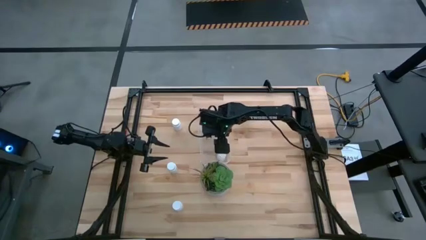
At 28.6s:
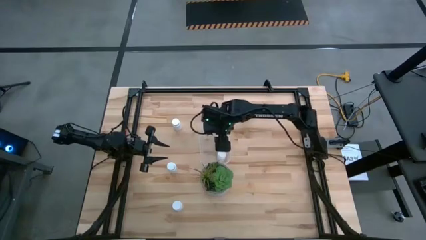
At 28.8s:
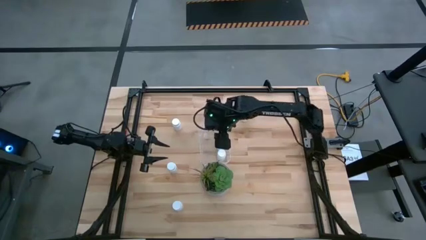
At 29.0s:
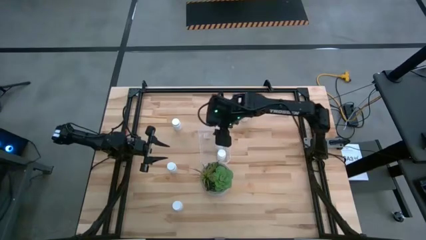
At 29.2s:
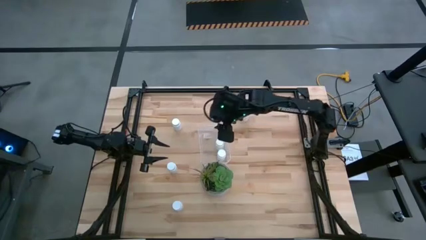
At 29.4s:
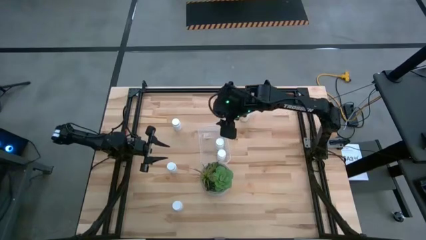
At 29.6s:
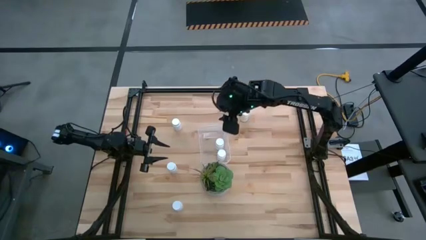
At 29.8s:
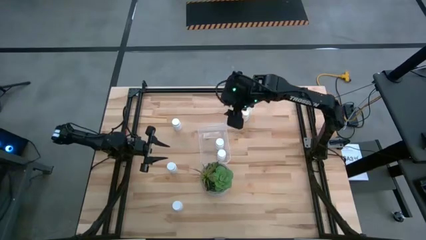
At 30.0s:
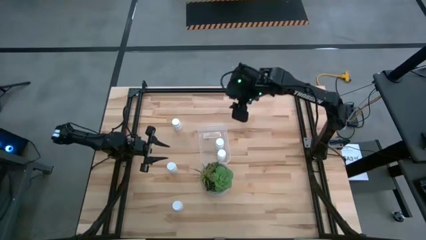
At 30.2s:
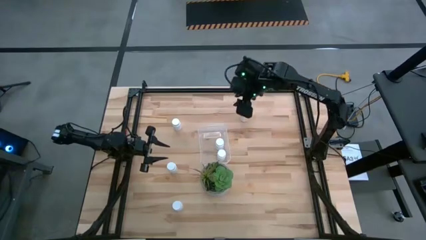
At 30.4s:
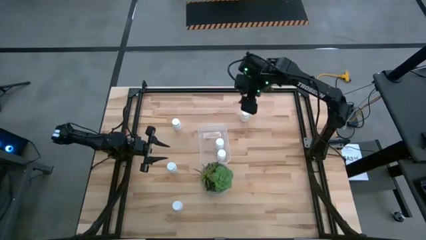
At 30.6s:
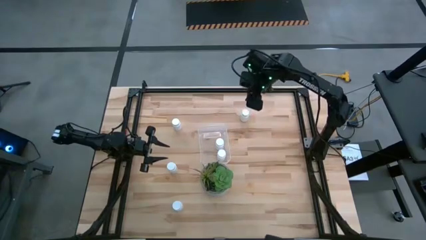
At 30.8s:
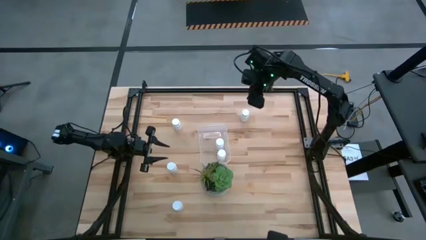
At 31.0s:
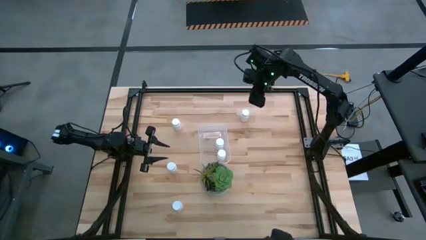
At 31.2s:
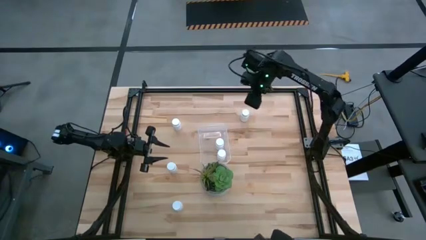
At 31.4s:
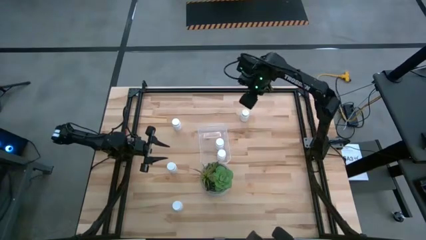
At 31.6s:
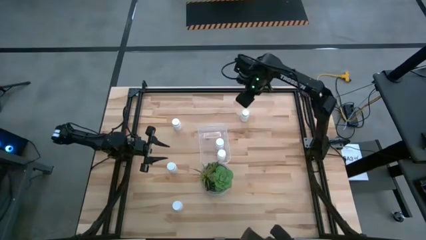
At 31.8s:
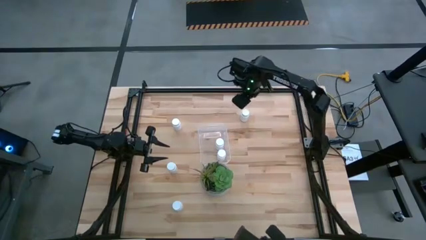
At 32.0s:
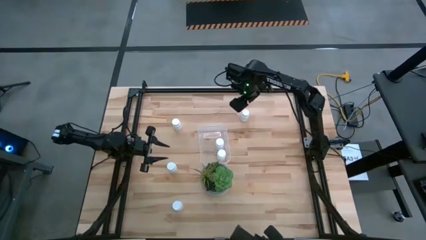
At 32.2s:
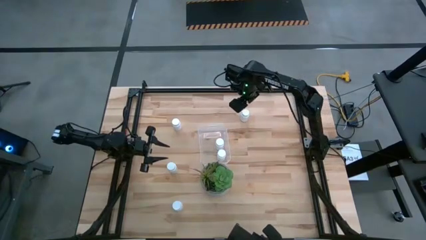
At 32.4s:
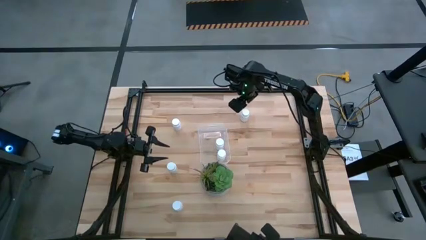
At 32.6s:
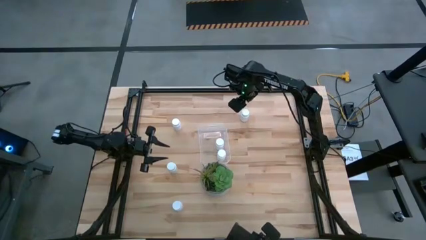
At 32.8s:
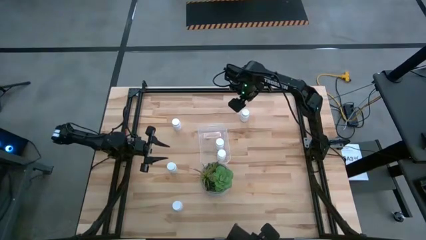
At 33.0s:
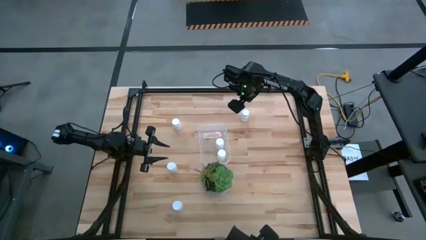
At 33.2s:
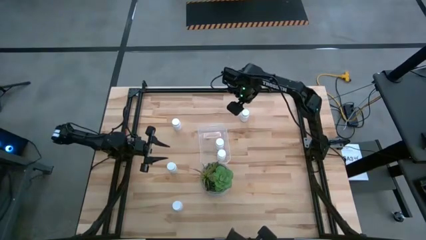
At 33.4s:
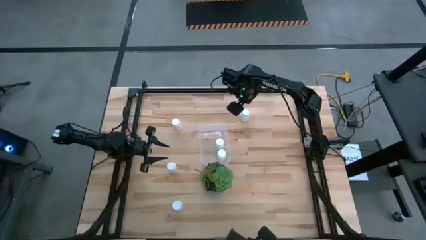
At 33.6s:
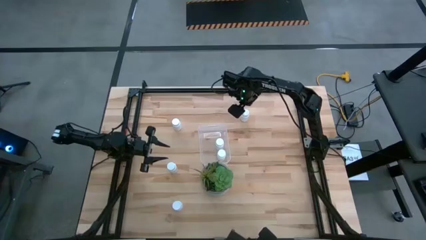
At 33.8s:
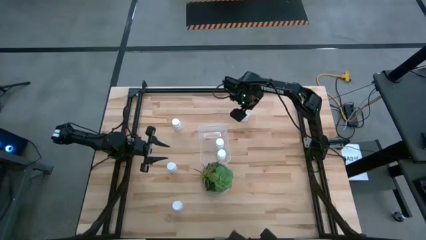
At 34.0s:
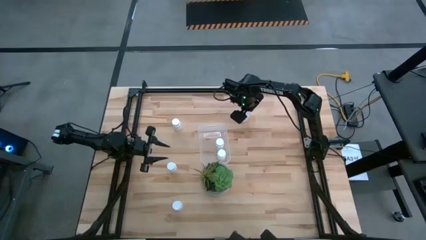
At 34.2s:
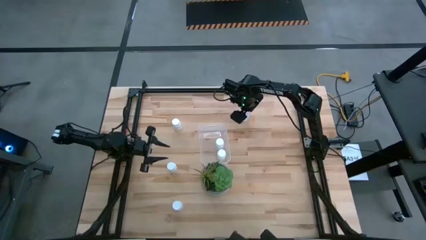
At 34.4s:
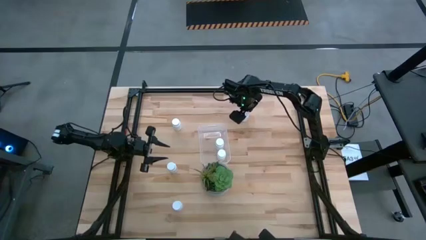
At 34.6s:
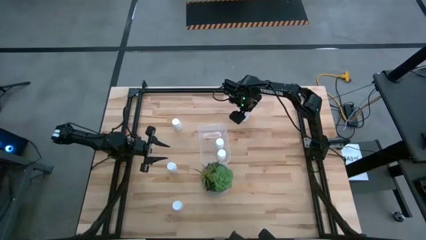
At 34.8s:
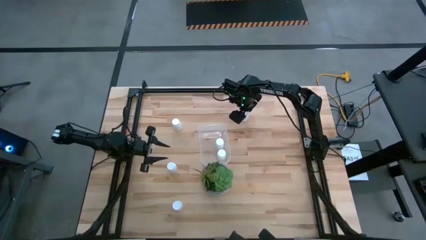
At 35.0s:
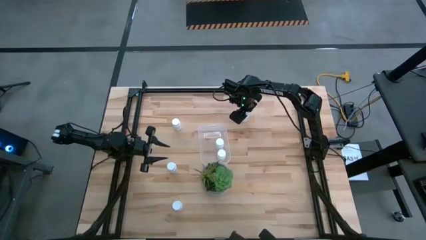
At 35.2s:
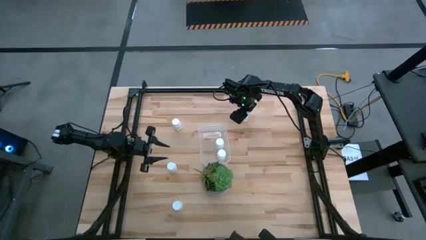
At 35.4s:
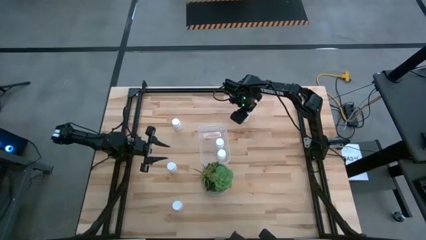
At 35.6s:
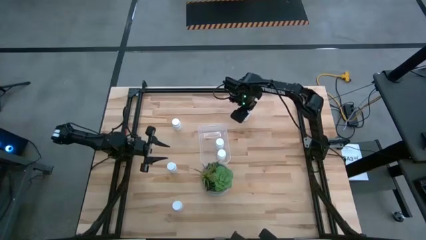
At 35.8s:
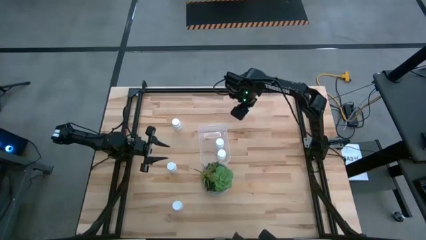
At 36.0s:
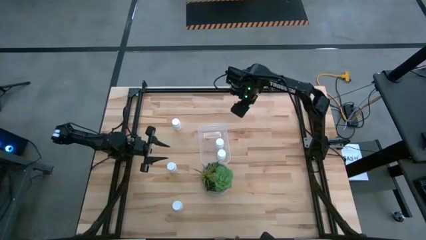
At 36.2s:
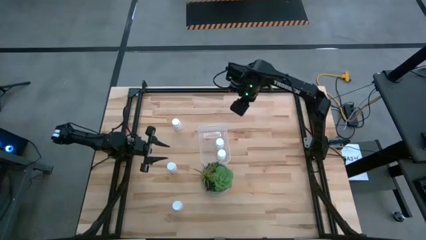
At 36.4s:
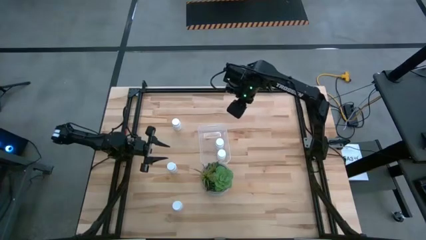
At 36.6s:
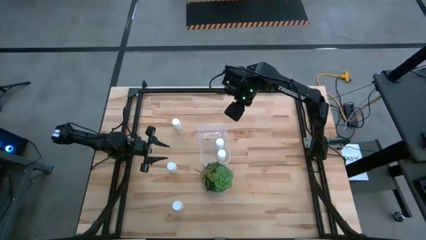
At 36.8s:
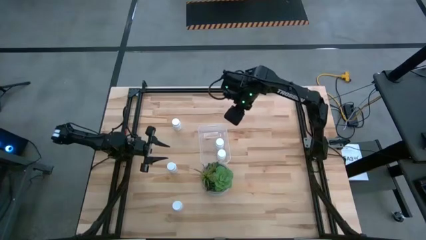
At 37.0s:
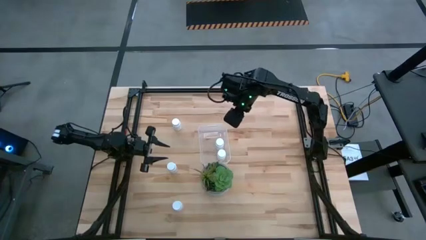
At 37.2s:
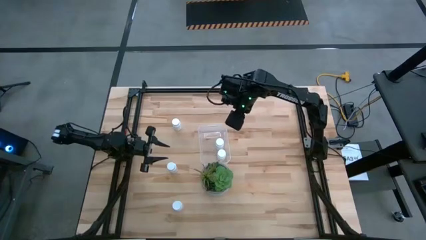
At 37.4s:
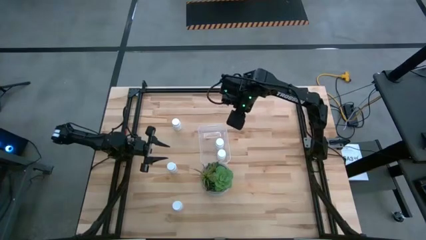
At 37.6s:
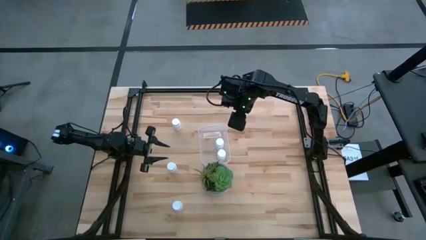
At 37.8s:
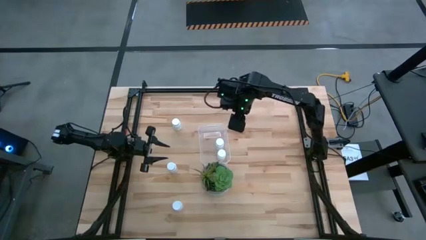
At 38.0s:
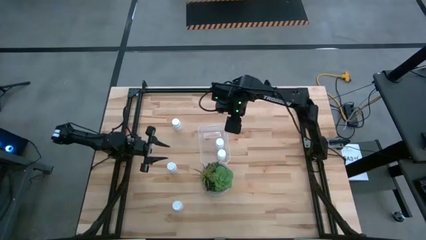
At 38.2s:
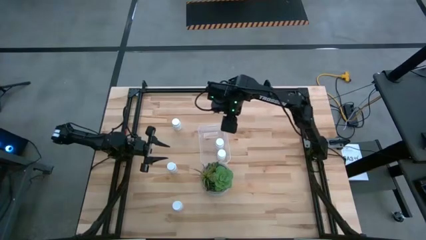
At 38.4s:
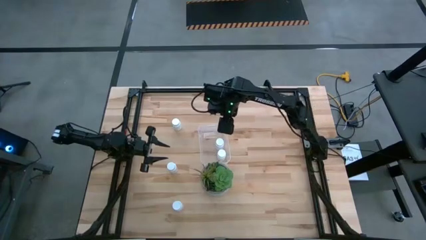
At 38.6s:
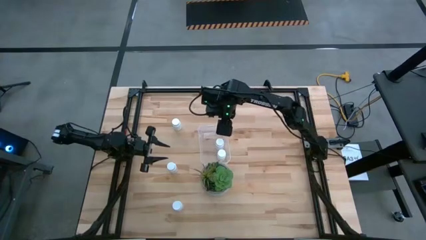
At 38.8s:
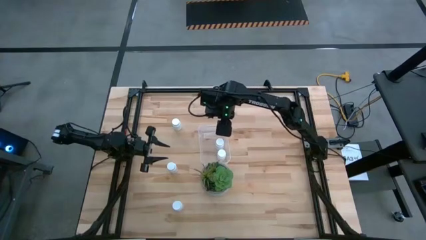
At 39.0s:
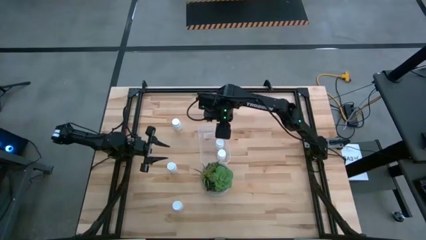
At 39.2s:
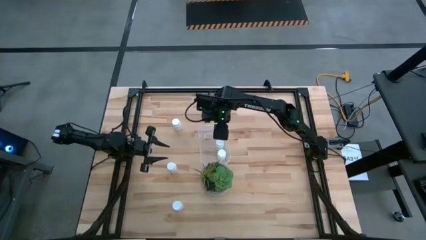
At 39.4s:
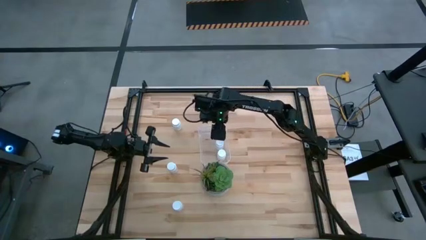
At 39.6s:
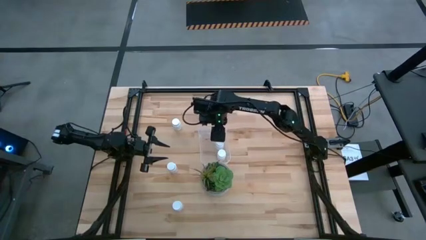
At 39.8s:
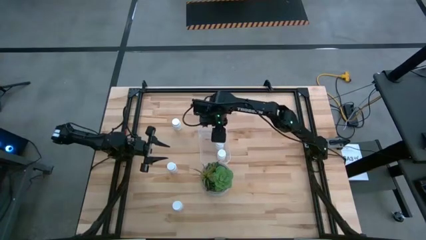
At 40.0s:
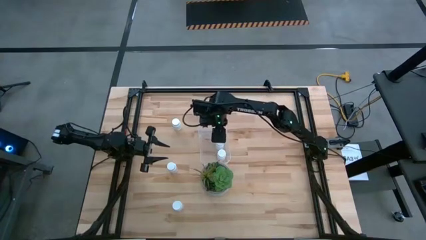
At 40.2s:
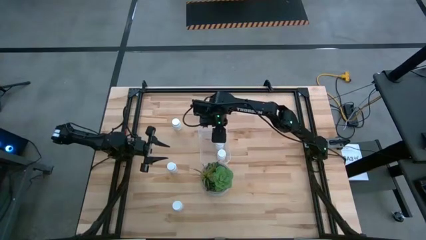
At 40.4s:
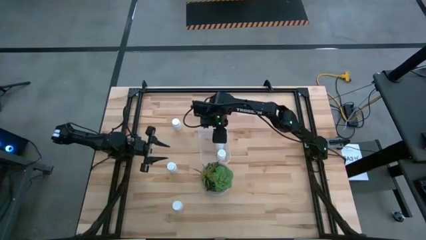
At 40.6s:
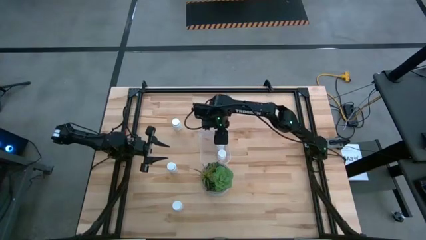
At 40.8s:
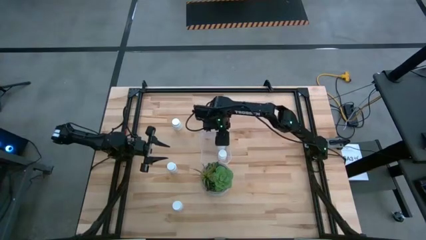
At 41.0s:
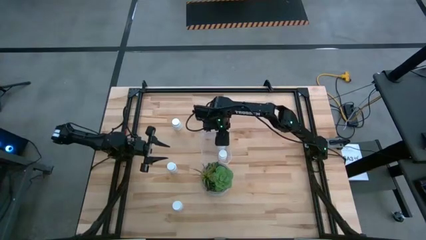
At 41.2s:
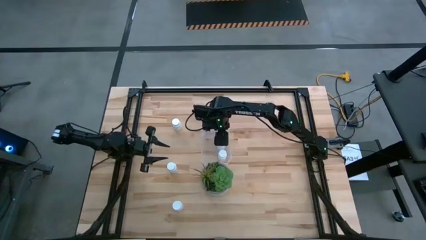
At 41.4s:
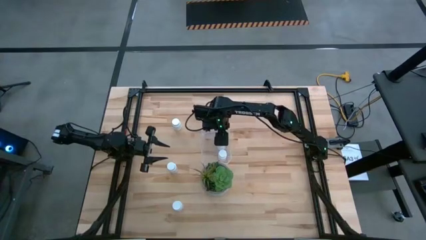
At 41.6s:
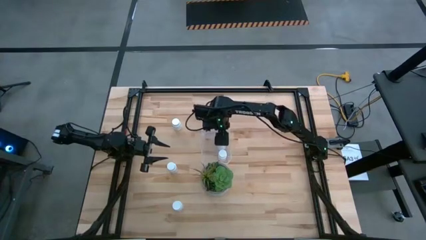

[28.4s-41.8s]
Task: Pick and place pill bottles into a basket
Put the white pill bottle into the transparent bin

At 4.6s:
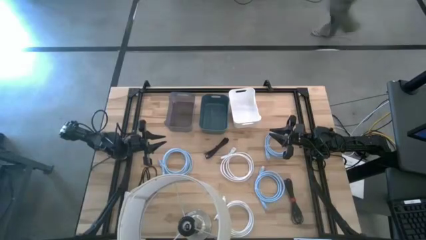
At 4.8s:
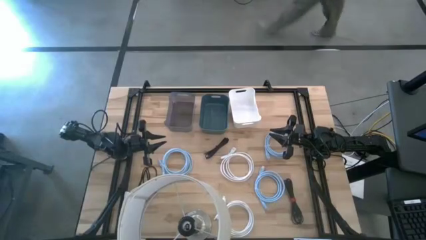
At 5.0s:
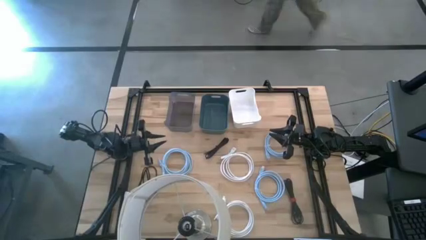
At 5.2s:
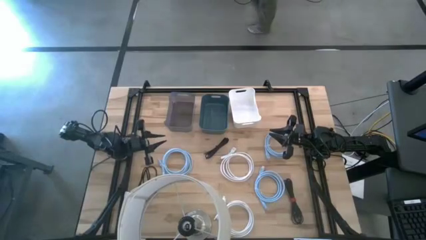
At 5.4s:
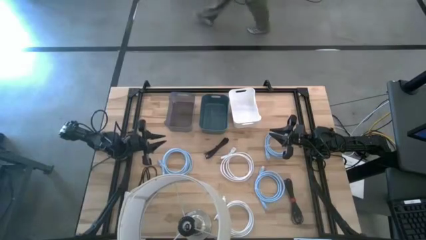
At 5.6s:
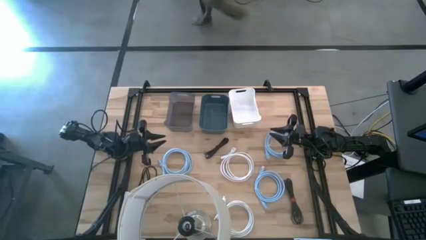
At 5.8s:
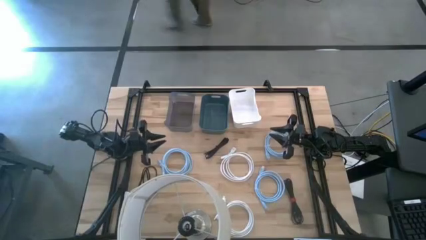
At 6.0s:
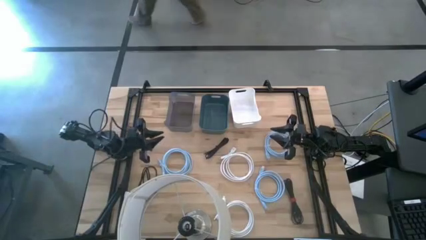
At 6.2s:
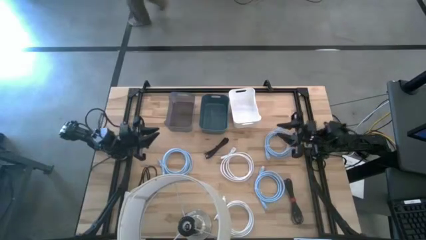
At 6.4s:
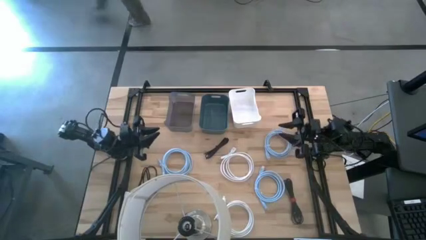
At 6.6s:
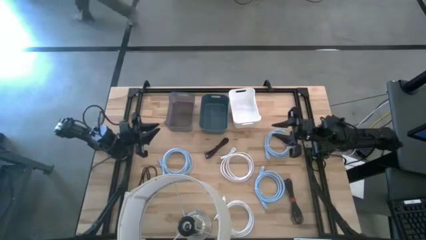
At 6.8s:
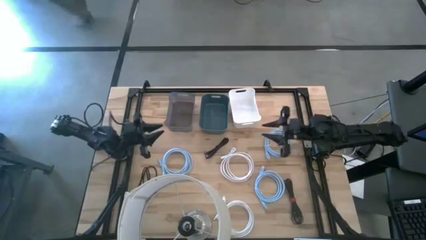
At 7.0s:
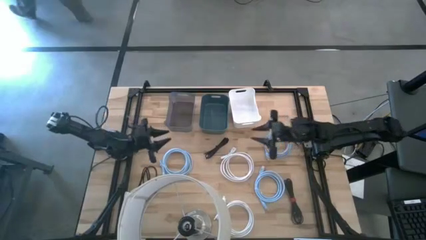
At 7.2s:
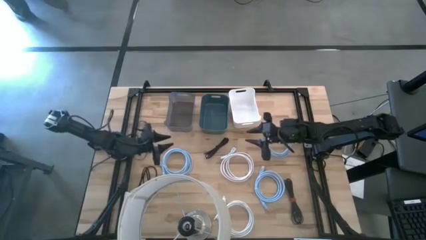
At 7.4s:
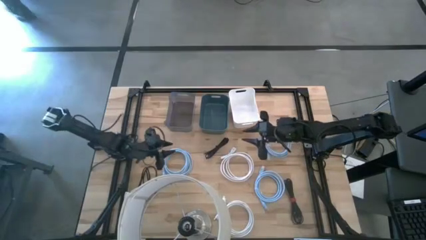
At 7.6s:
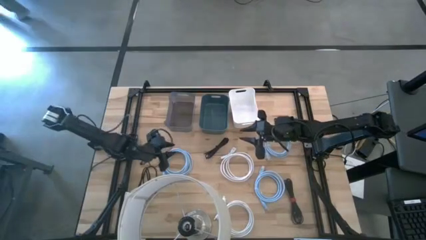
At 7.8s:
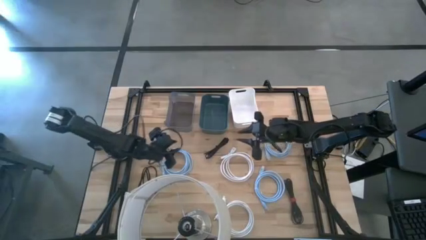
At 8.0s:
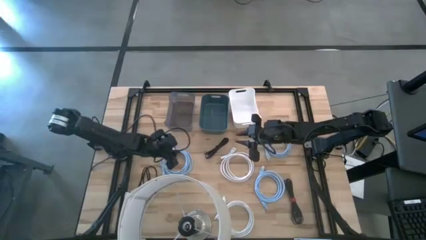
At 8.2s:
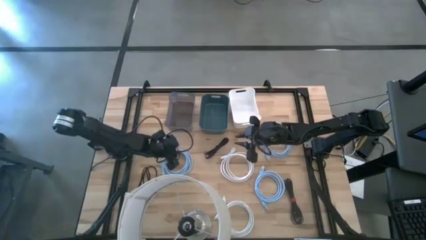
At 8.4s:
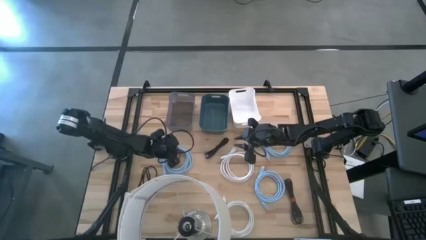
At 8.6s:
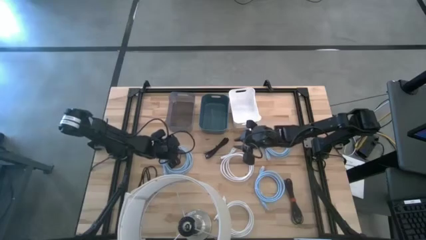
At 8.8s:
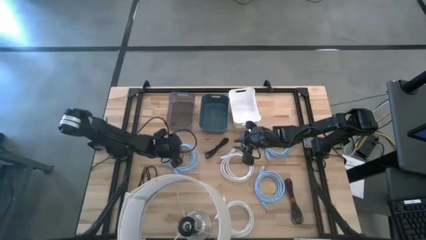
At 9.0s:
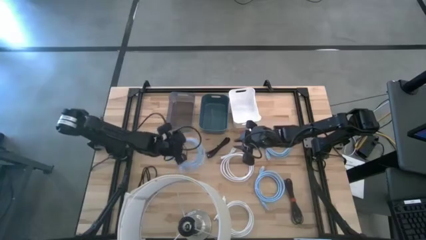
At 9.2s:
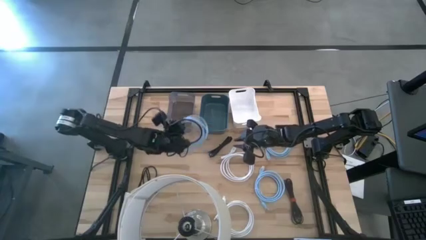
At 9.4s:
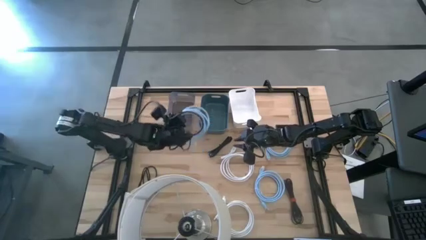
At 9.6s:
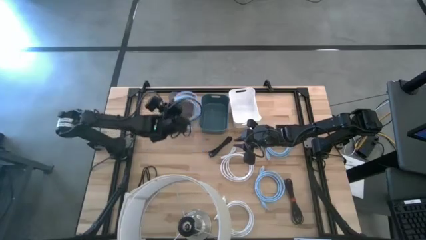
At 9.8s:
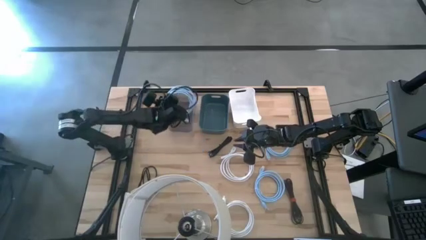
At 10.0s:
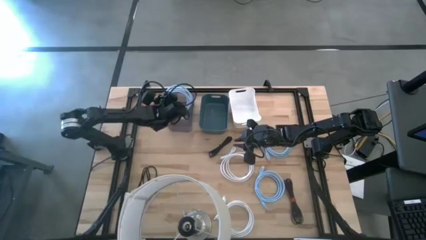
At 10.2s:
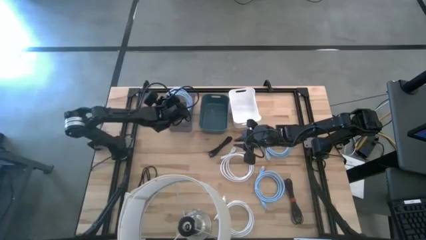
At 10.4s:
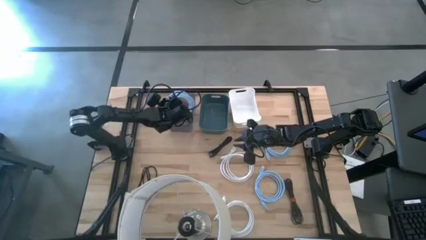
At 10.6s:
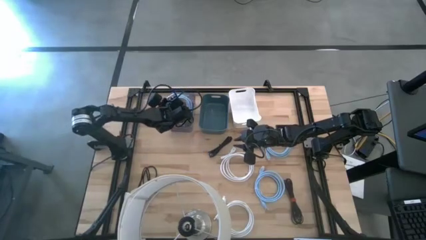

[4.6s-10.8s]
Task: Sort HDMI cables
Put the middle blue HDMI cable into the black bin
